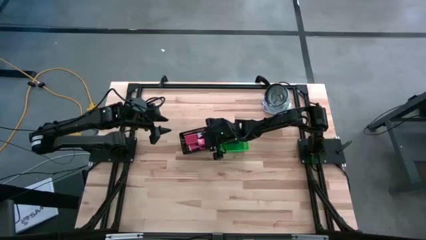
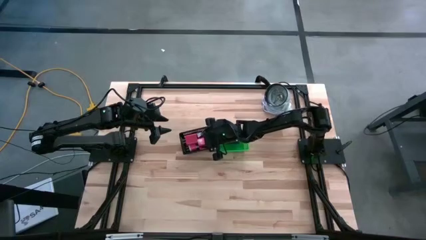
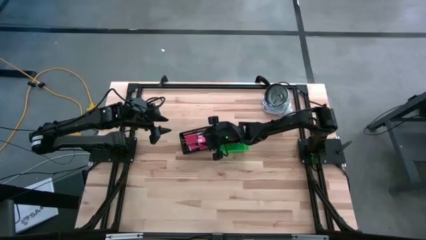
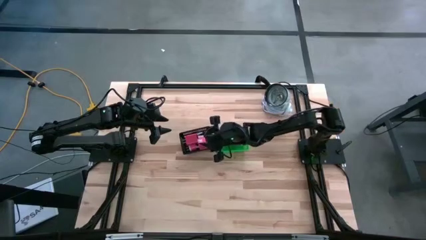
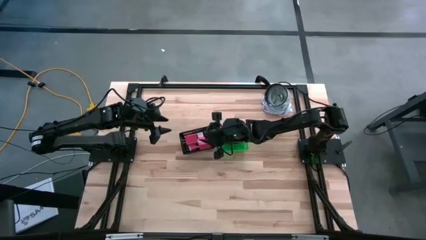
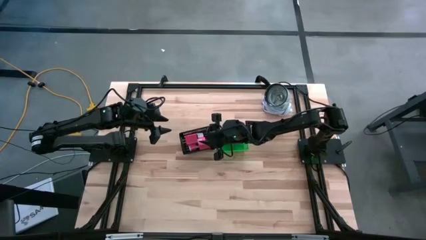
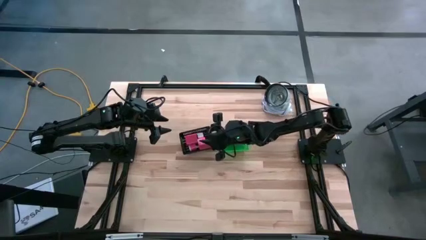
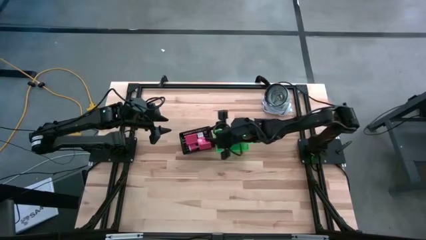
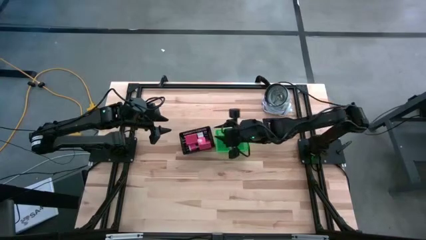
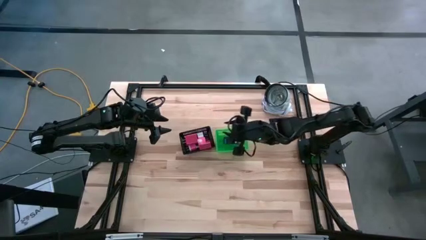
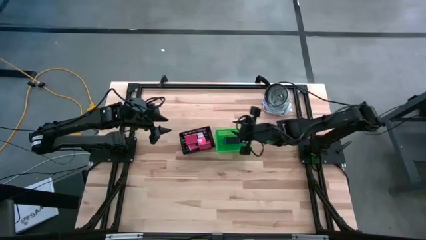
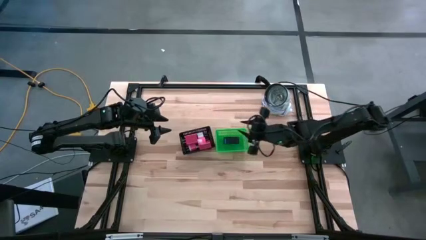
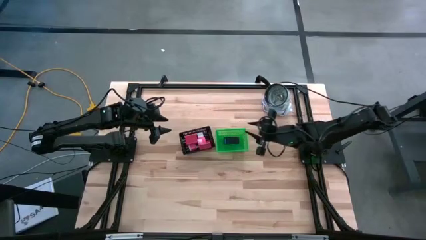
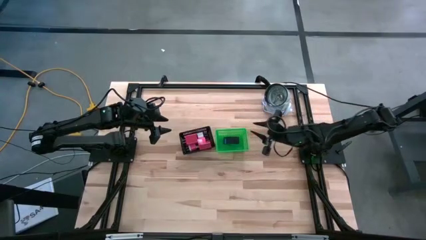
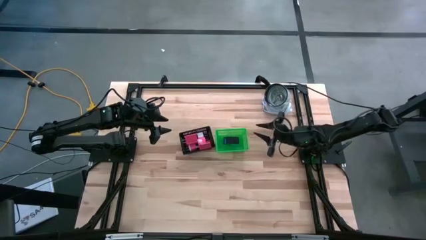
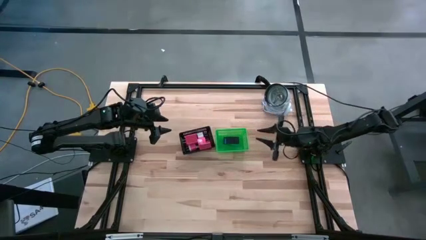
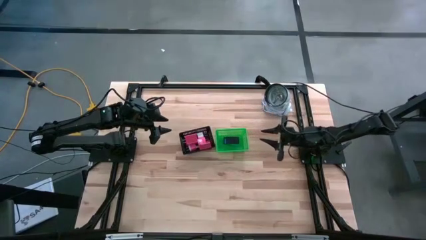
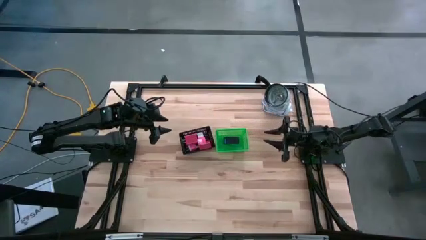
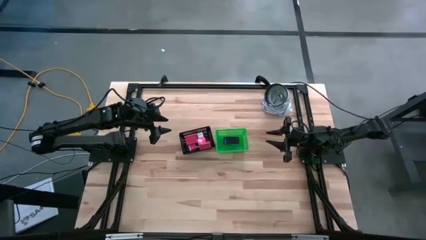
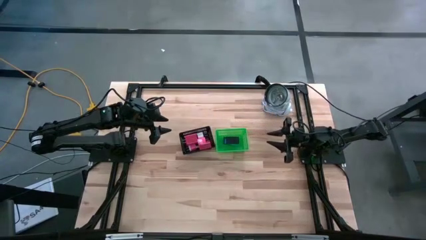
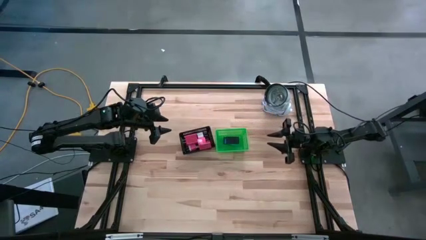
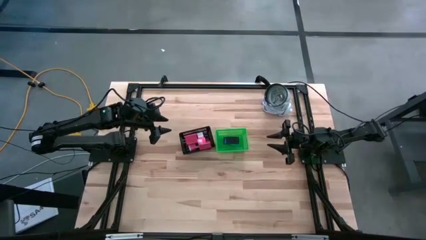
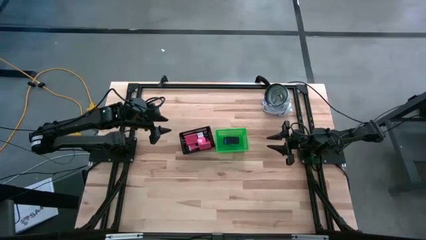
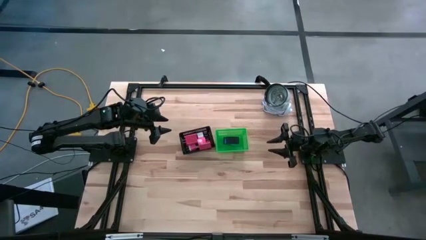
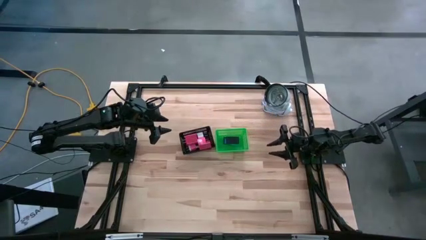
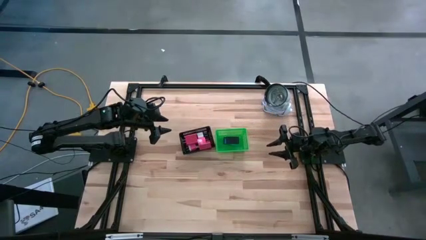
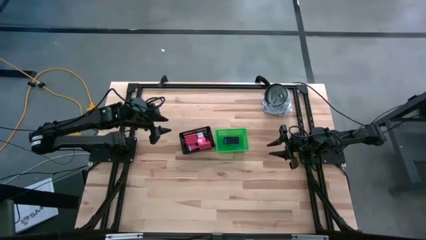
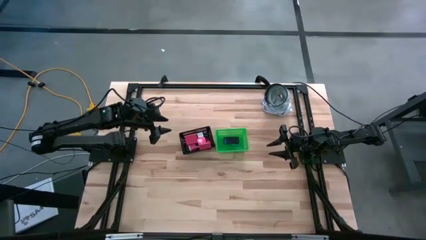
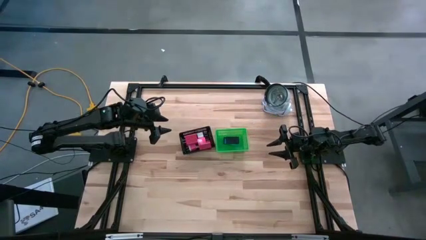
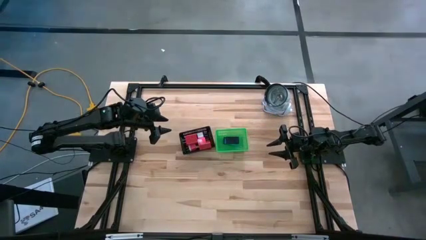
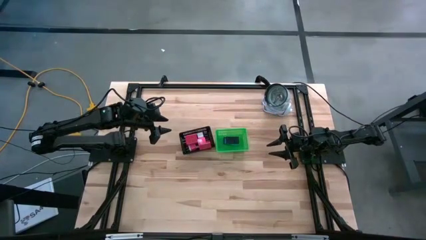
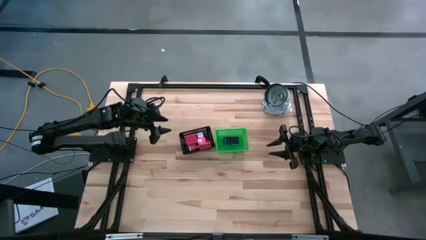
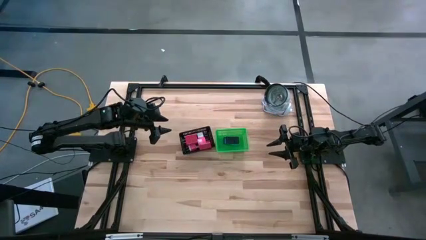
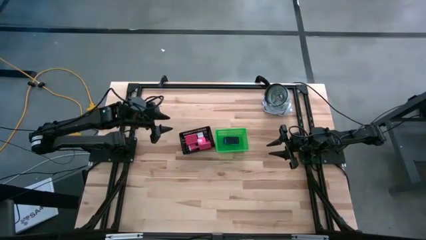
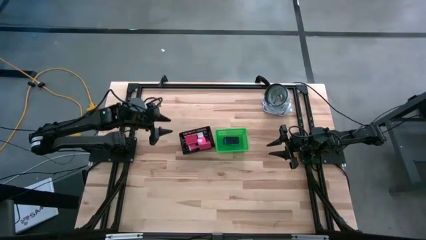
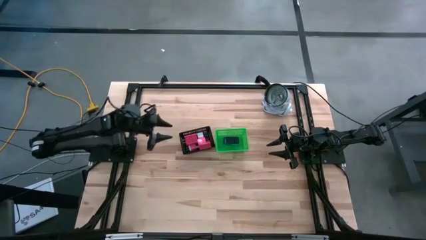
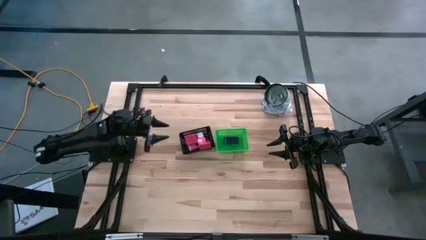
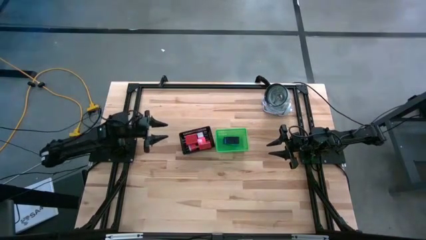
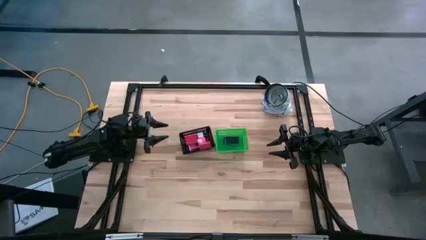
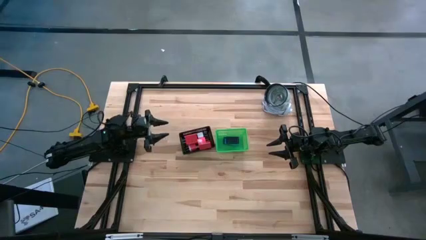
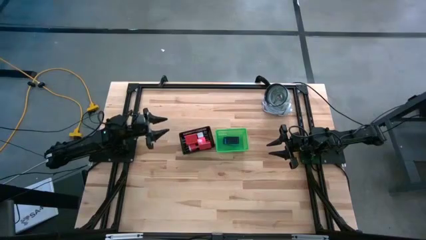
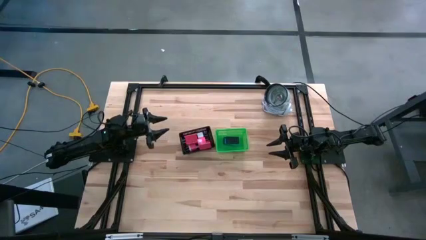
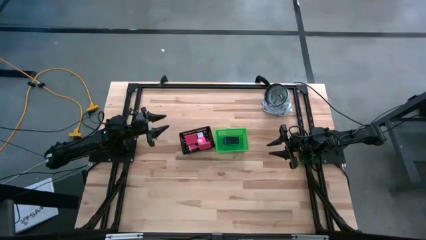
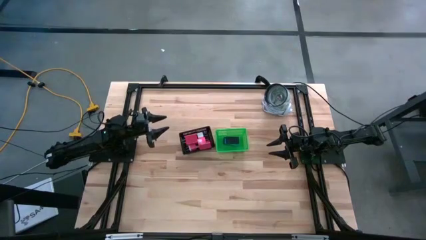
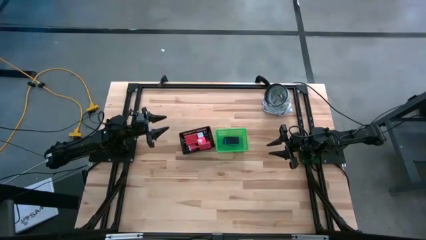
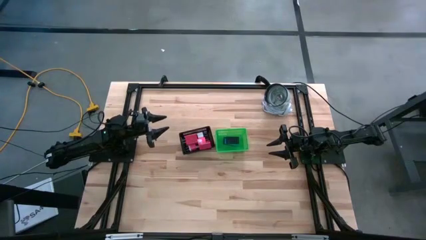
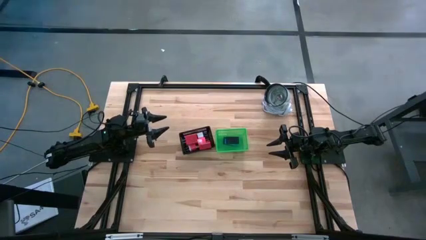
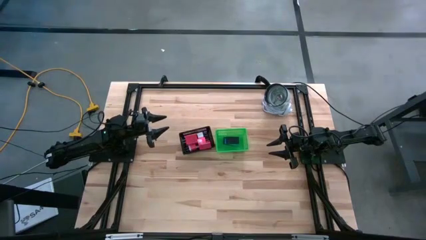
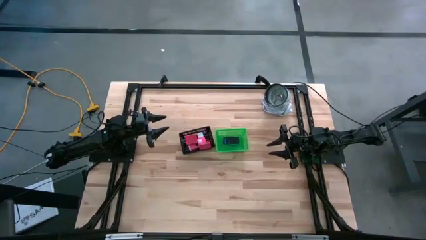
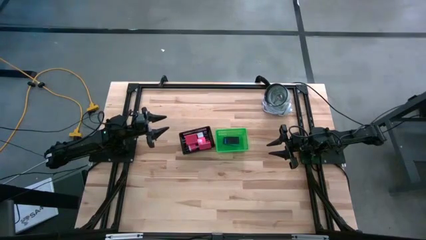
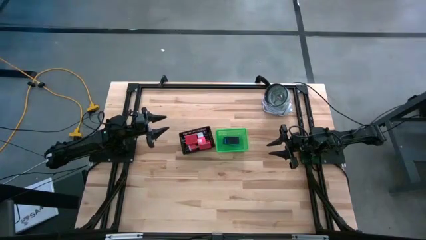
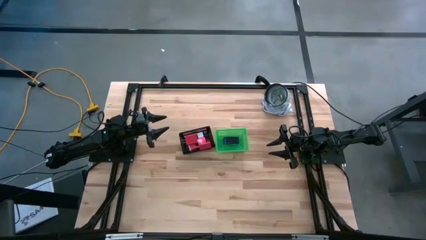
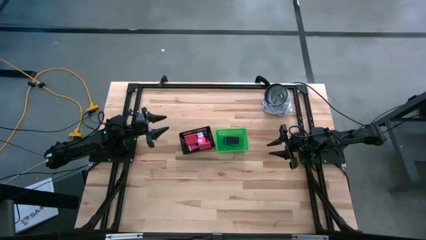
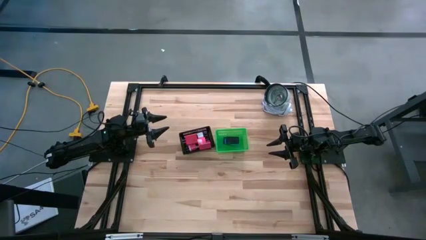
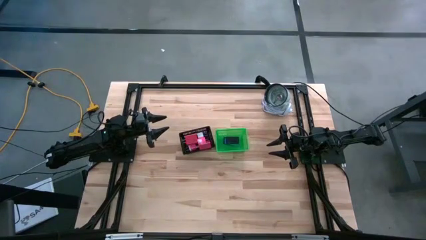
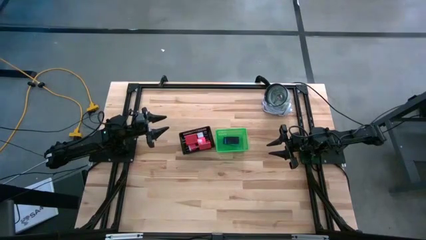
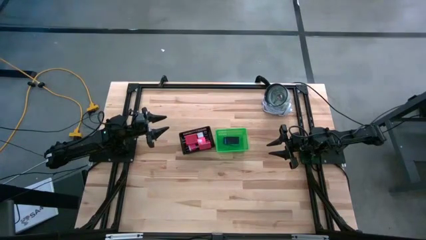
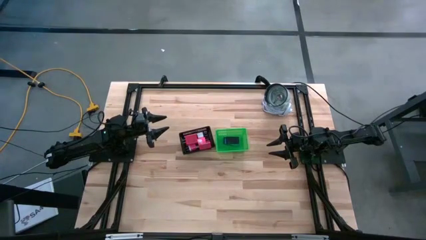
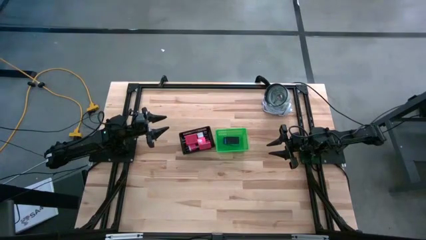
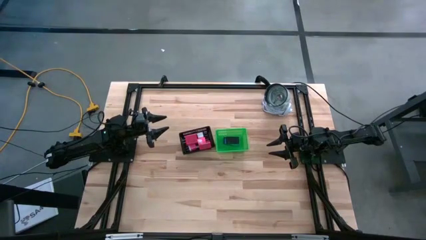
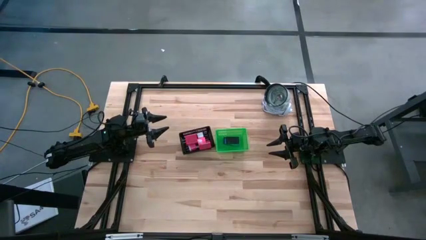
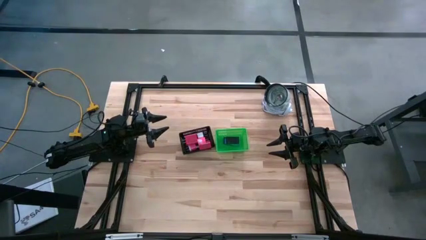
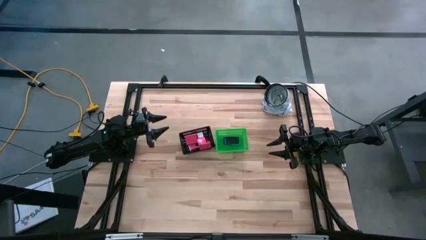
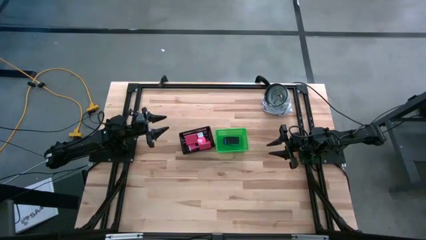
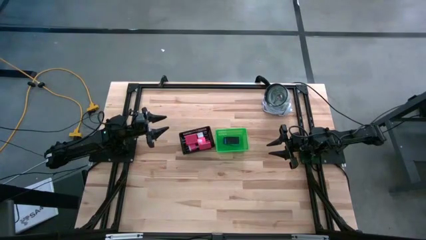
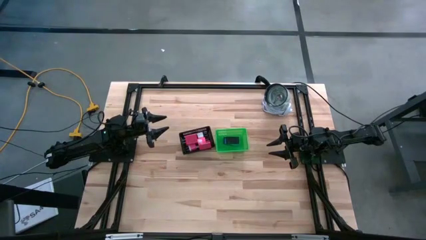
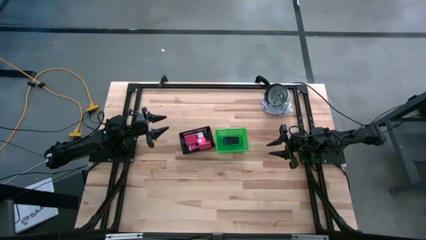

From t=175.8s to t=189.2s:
Task: Pick & Place Office items
Return to Home Position

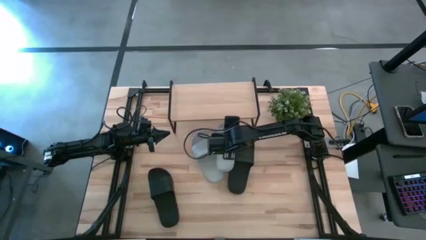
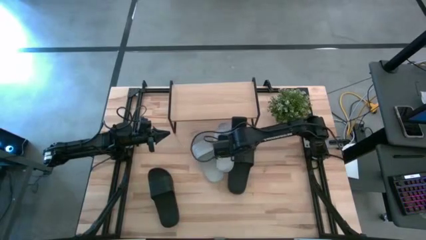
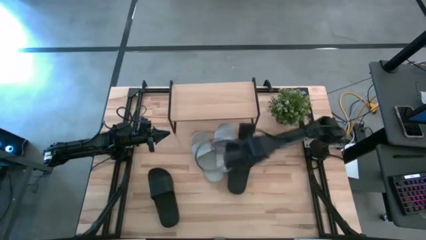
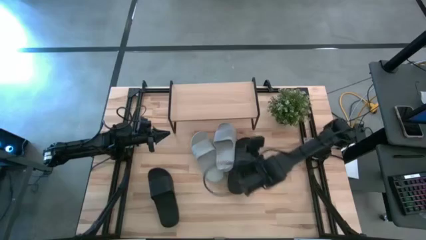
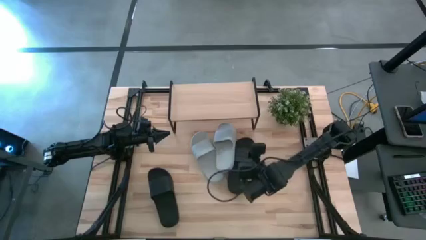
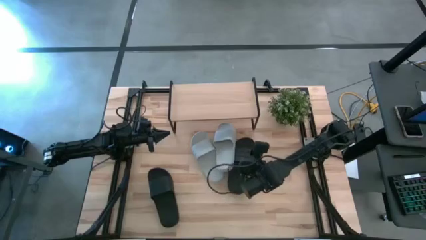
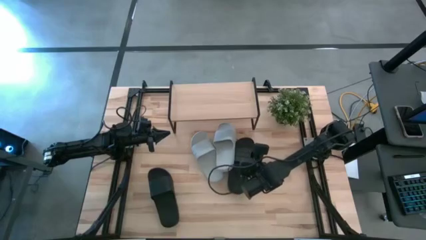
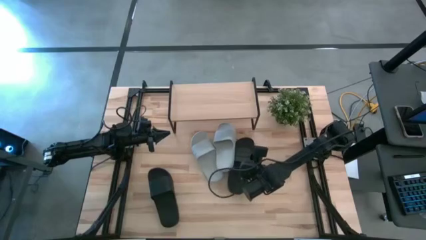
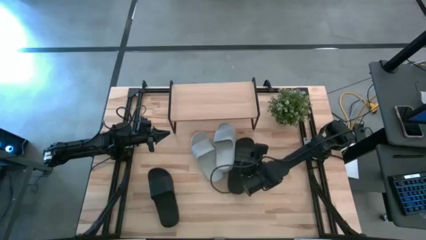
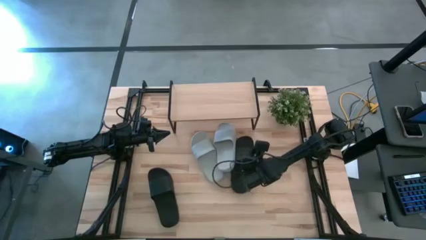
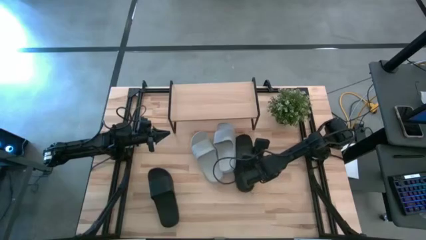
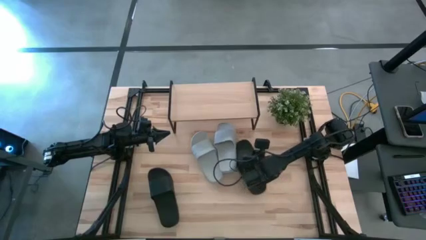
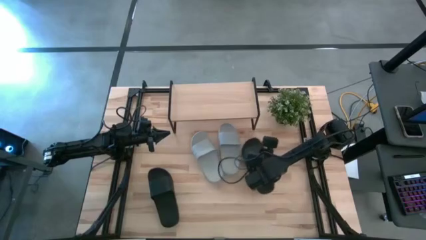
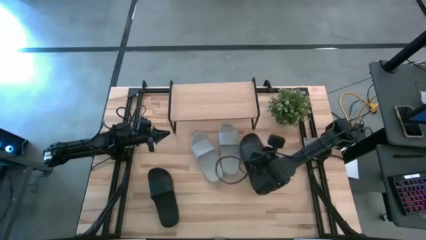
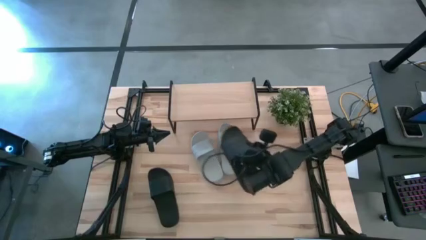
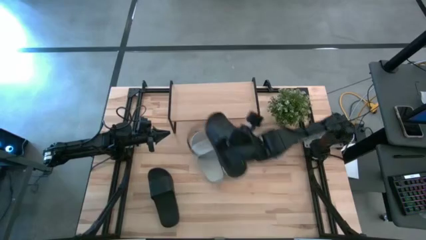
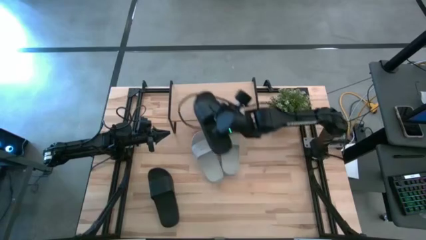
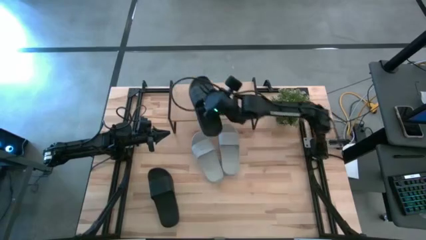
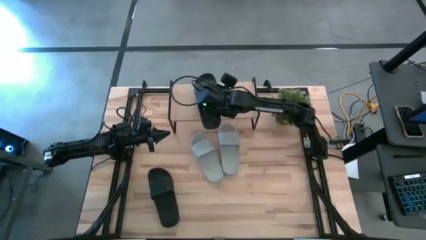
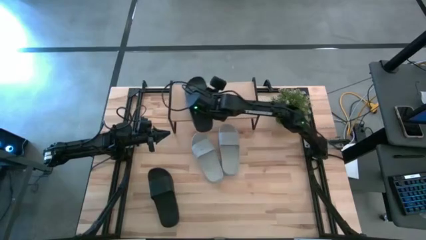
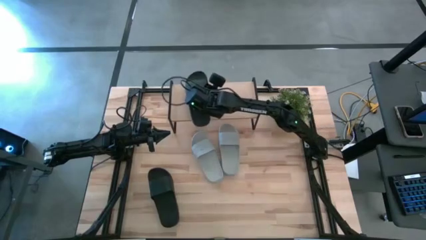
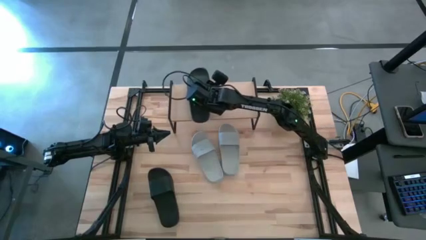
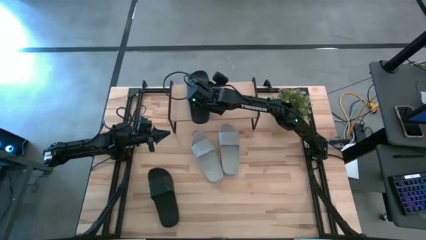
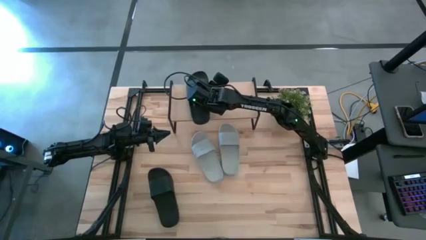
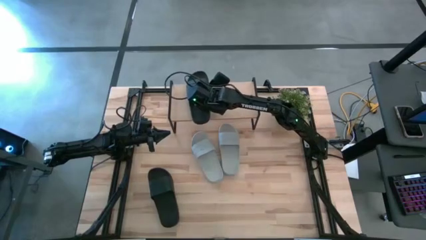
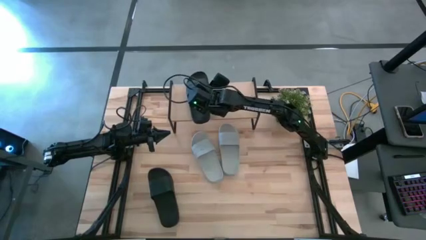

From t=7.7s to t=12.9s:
Task: Pick and place slides into the shelf
Put the top black slipper on the shelf
